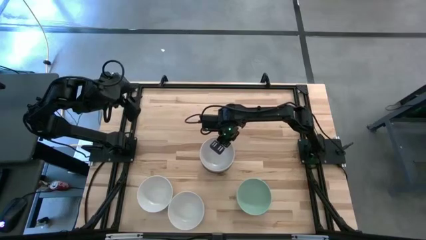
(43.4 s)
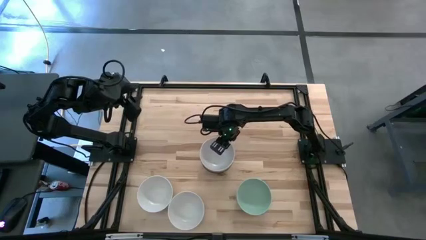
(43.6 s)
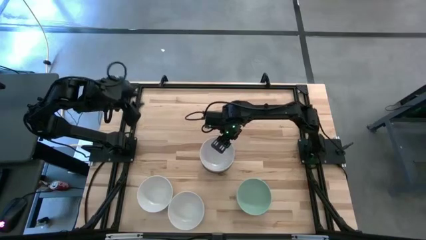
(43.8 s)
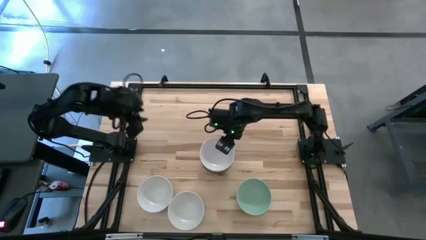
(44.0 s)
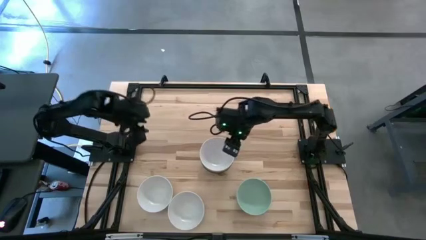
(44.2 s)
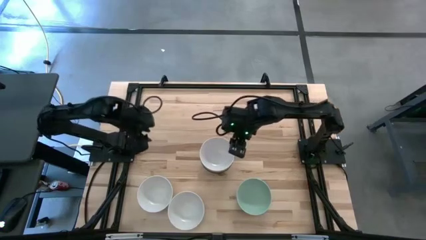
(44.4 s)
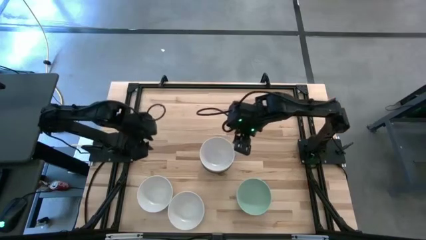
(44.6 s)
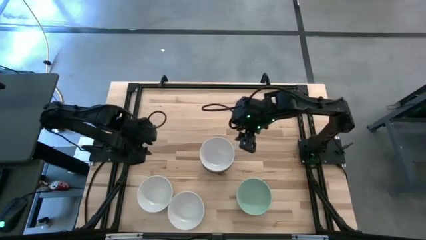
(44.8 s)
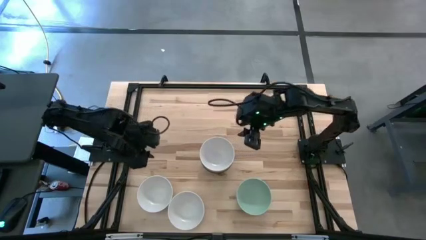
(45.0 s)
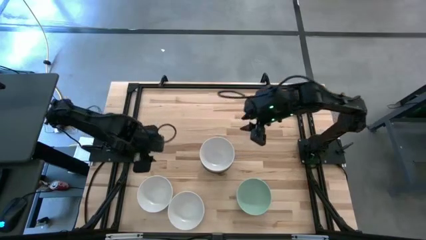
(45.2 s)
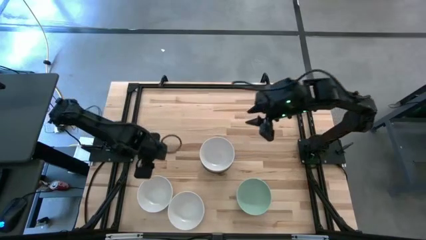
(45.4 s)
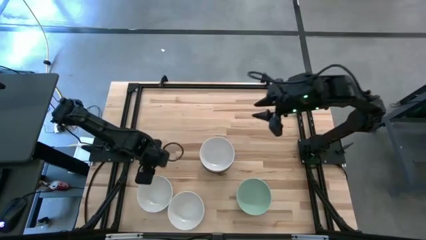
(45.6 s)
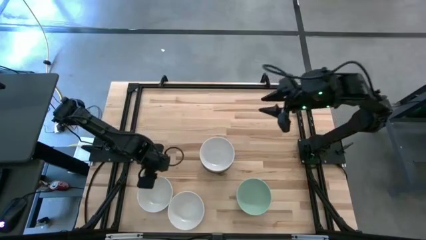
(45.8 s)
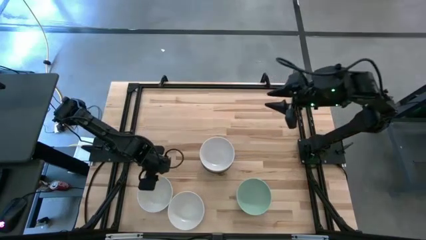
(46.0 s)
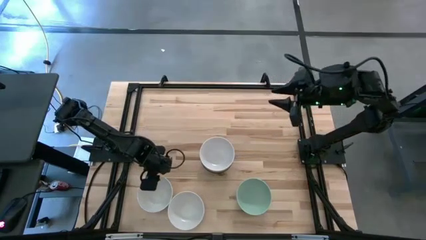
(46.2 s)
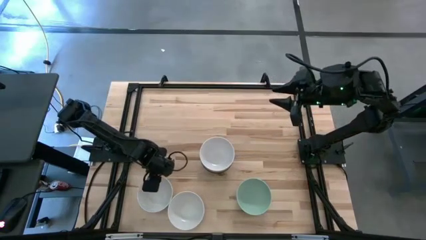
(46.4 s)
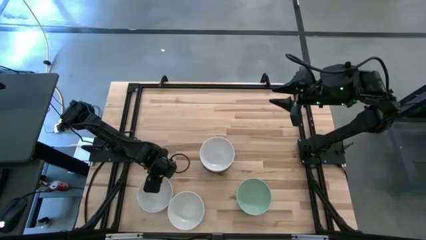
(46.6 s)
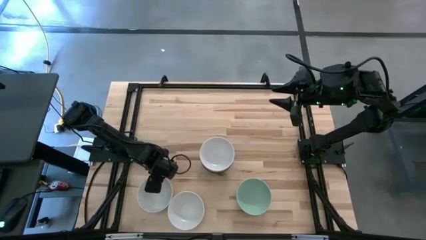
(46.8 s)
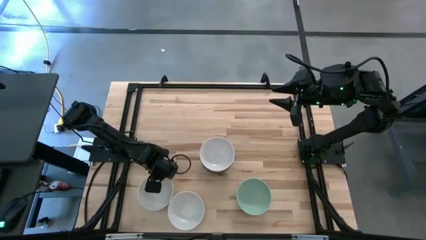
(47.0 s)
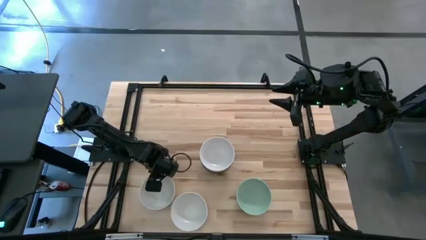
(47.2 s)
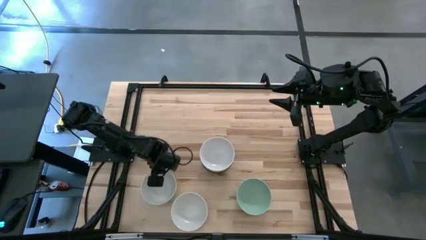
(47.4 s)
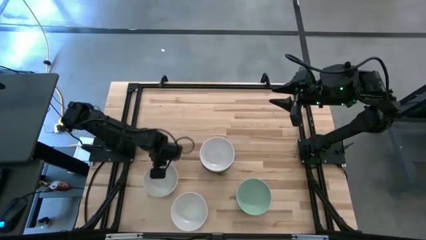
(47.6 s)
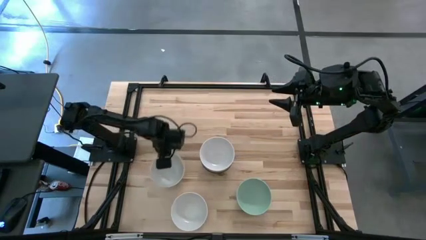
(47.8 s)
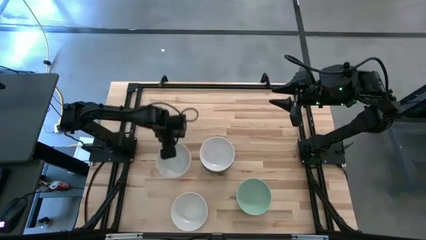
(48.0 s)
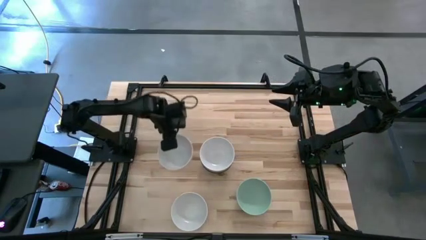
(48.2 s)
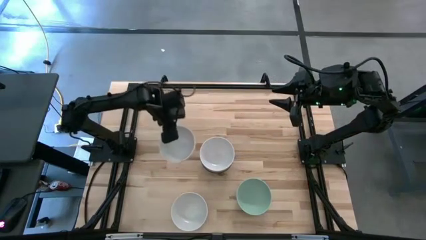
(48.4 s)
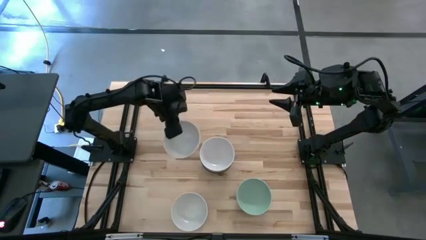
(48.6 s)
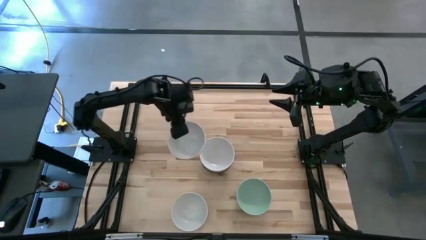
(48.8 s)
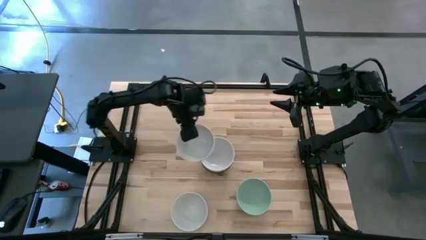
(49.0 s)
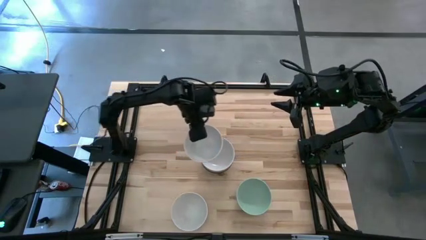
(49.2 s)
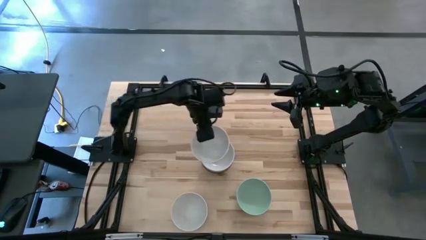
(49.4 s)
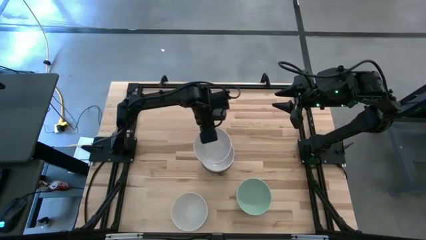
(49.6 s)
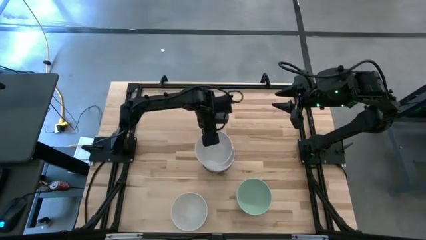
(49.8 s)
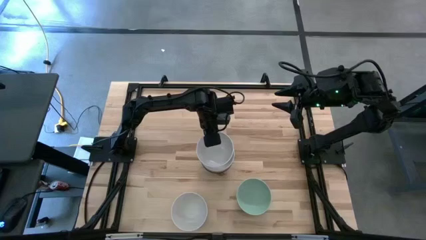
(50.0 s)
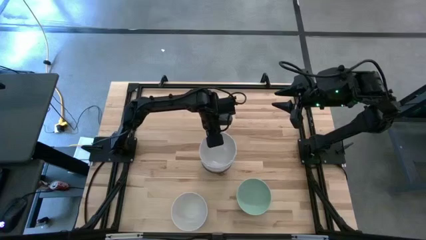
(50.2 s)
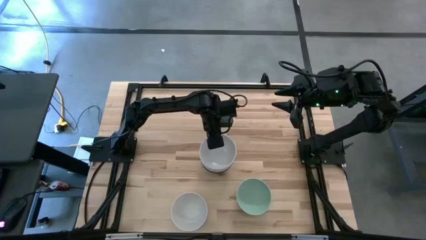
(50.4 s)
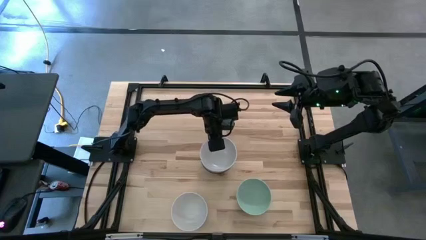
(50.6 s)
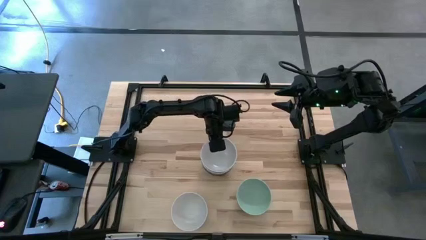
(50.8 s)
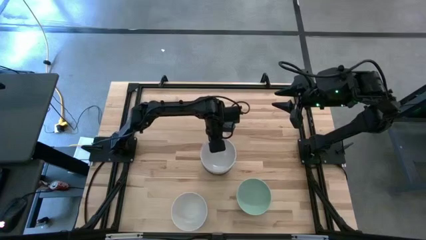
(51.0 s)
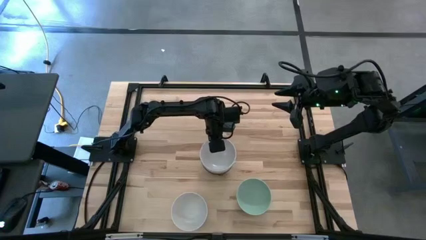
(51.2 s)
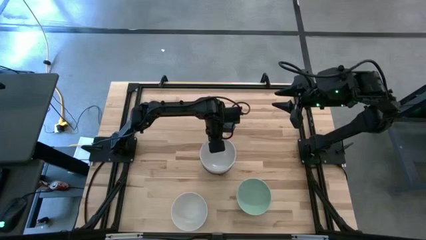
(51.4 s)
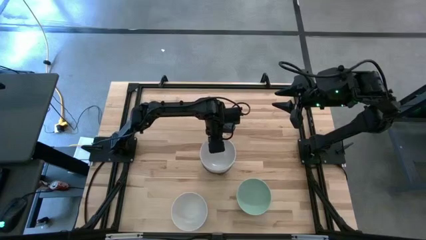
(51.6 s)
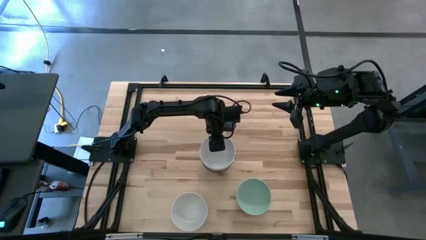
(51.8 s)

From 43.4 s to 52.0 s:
Task: Nest bowls inside each other
Stack the left white bowl on the white bowl

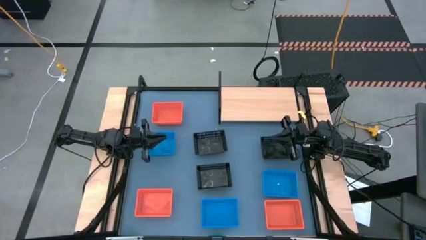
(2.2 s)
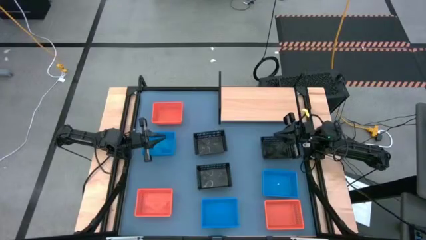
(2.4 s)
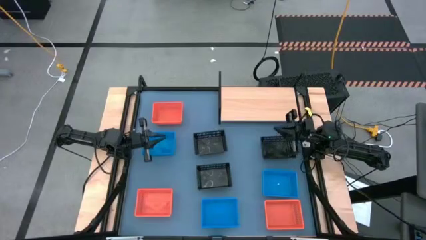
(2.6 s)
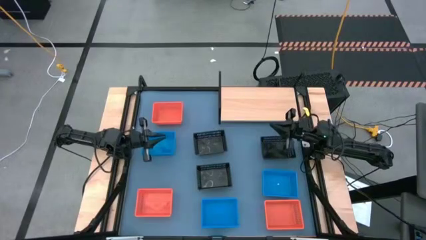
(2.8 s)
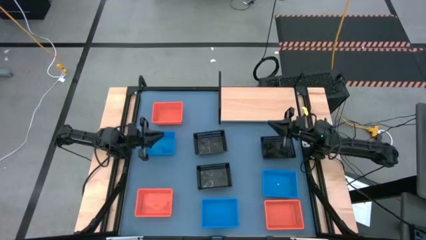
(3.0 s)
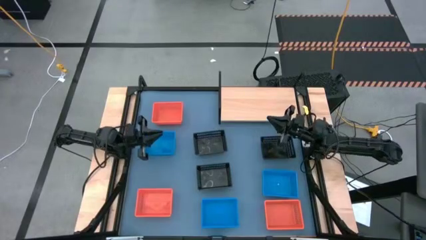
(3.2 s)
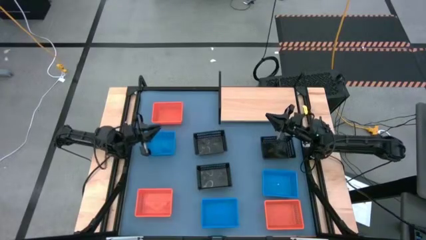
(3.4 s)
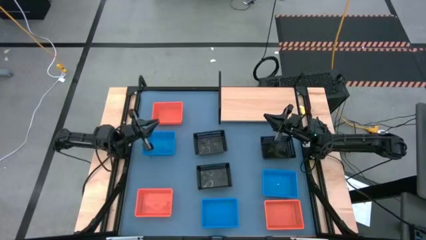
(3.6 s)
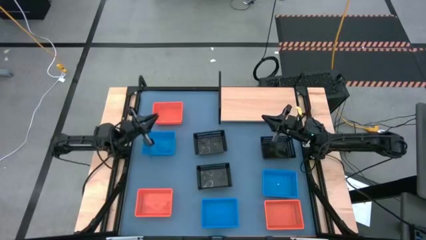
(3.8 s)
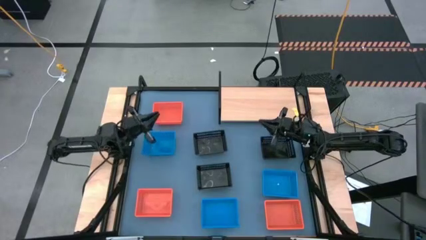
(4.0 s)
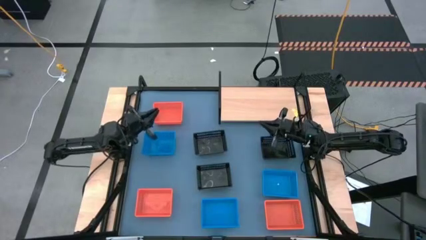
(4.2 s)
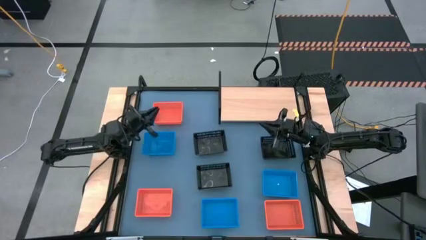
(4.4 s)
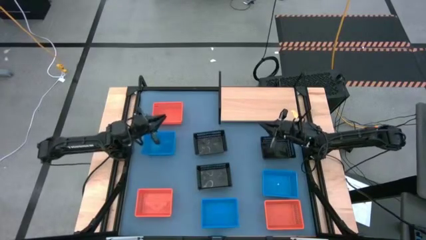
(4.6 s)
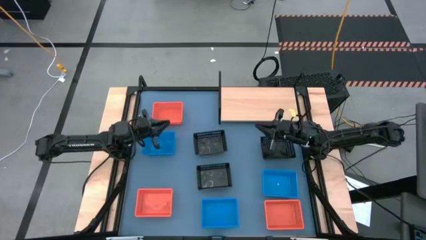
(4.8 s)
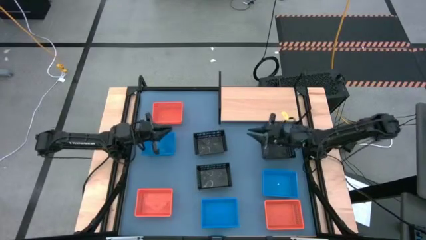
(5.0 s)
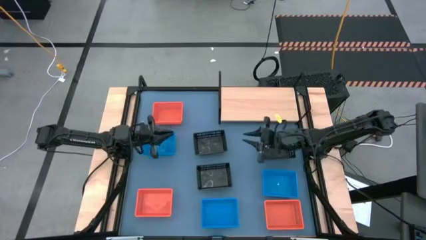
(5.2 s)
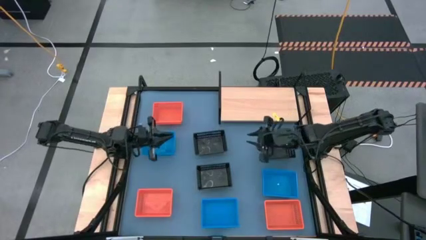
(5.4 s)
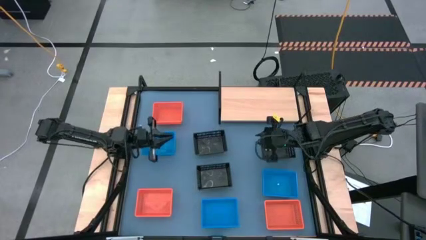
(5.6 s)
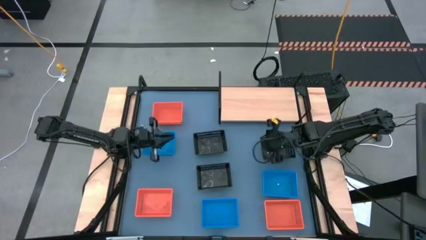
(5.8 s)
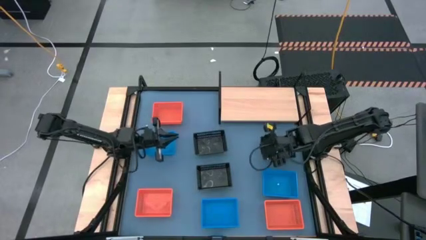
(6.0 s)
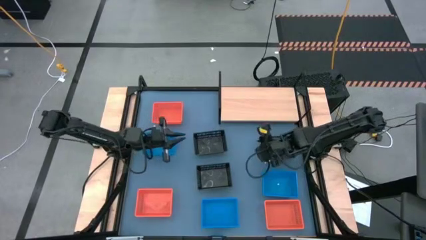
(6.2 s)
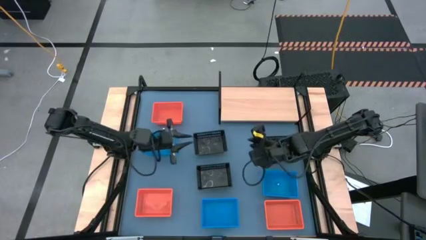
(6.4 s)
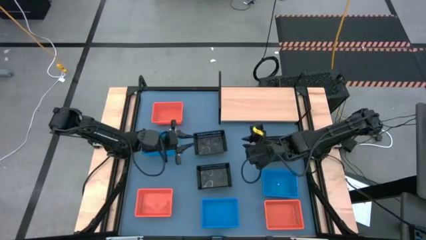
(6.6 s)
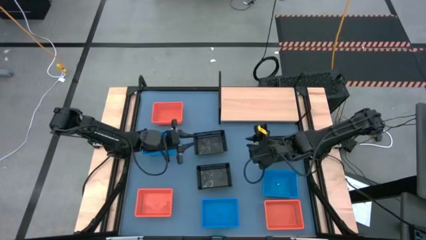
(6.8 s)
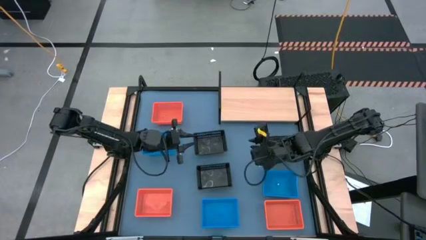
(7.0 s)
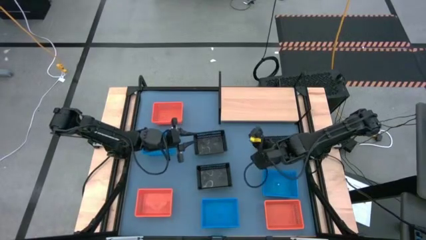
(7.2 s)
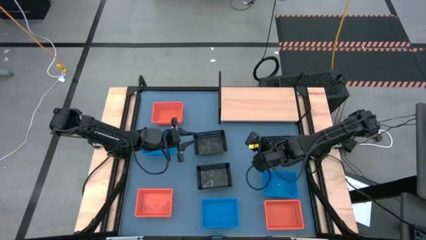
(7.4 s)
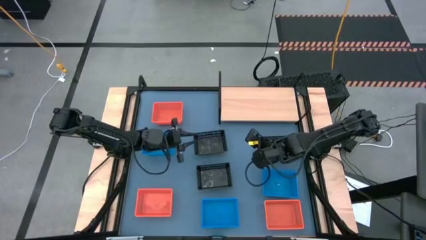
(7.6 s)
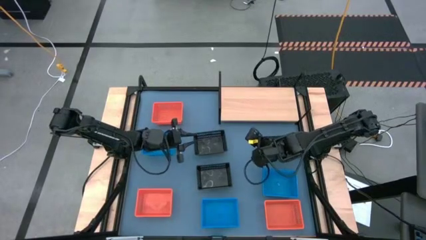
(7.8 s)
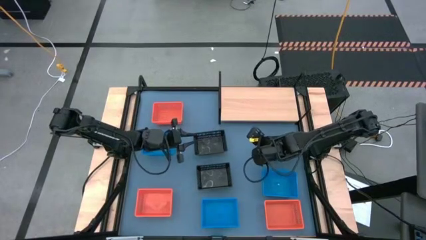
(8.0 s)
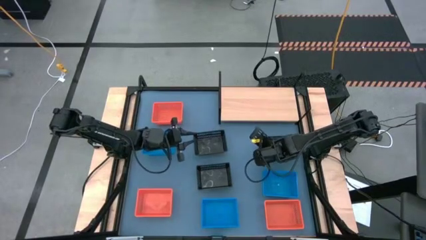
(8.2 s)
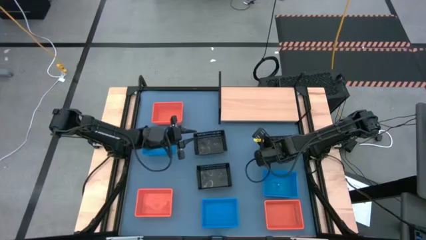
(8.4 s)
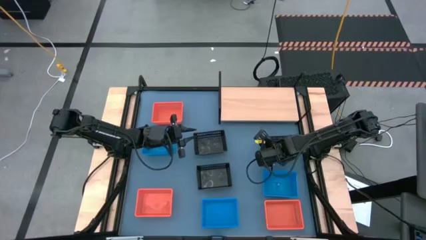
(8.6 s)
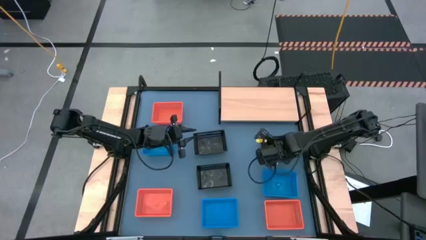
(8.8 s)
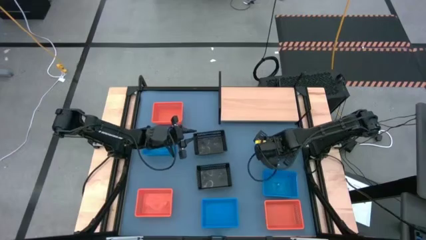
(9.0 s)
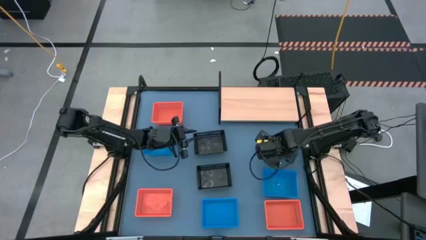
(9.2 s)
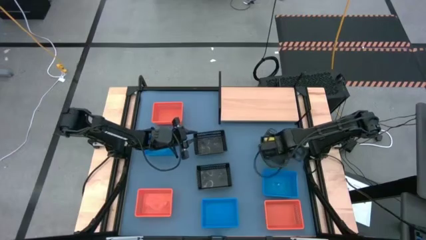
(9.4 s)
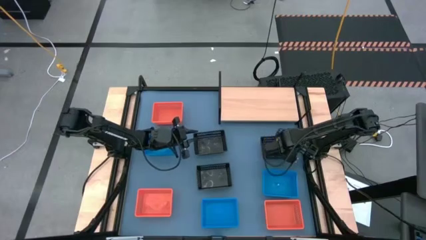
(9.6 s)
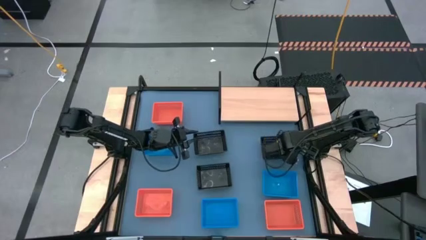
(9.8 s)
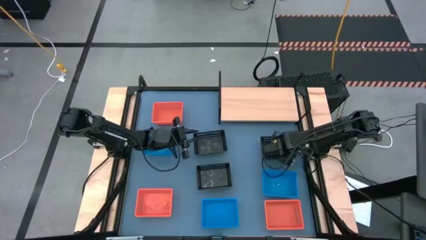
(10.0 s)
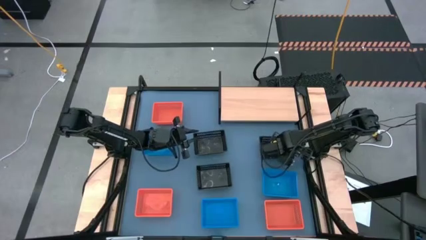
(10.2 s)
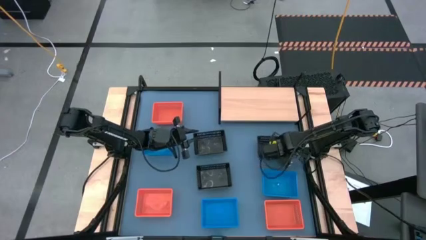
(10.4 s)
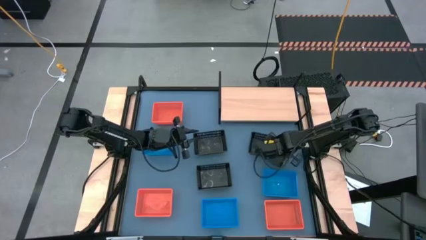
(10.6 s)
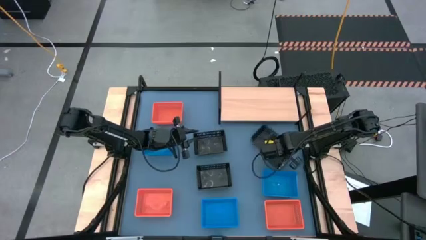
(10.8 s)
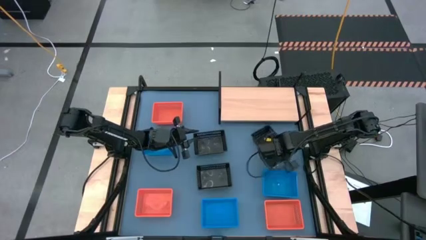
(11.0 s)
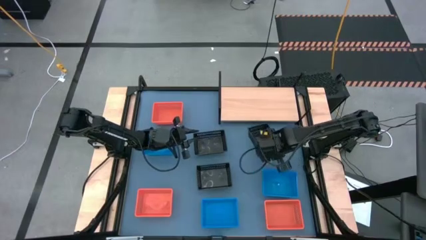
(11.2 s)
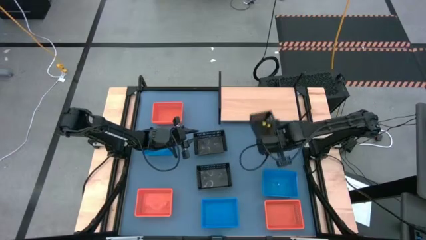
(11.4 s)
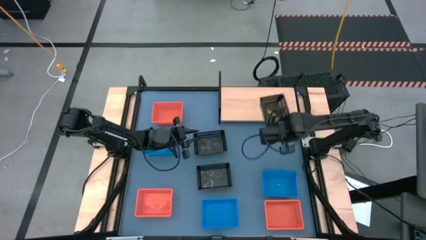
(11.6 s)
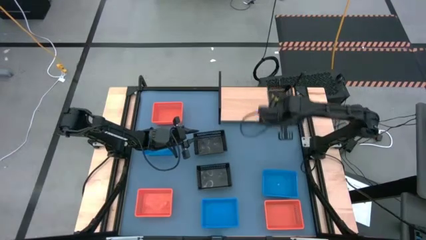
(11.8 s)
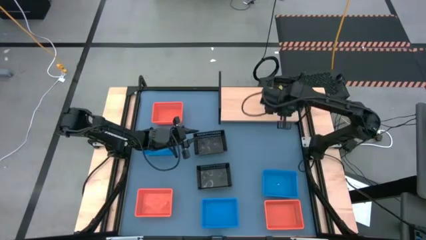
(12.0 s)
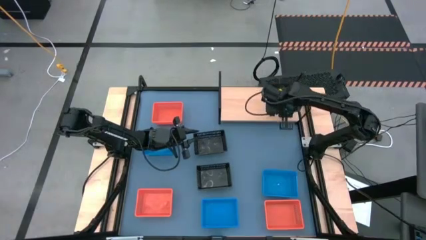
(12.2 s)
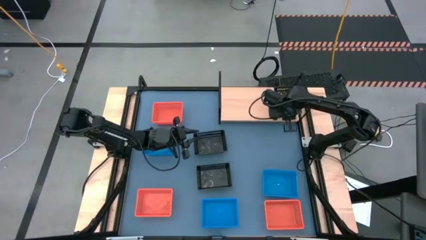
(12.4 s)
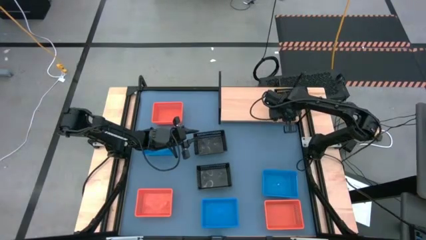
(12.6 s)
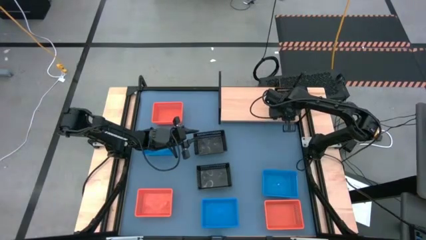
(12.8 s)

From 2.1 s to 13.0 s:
Task: Stack baskets on shelf by color
Put the top right black basket on the shelf
